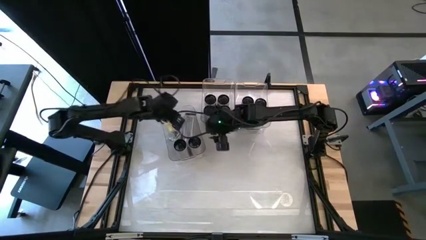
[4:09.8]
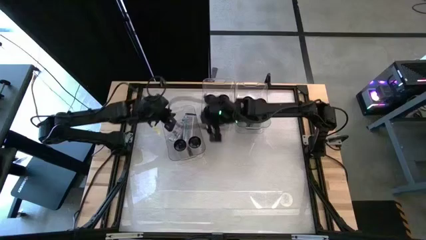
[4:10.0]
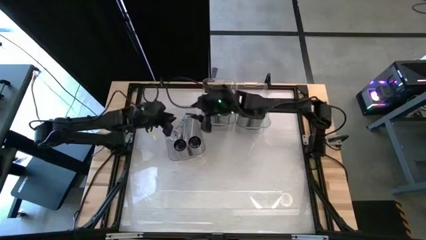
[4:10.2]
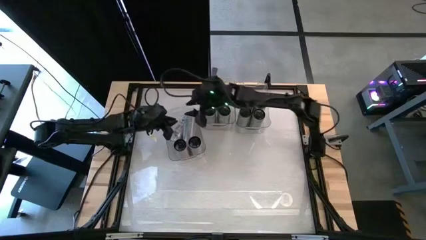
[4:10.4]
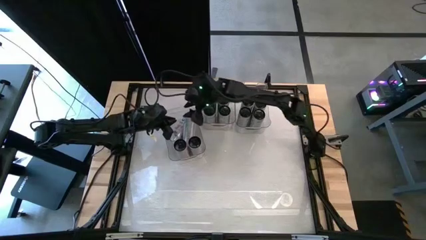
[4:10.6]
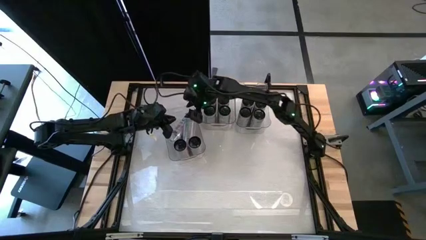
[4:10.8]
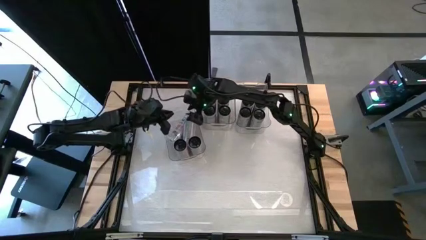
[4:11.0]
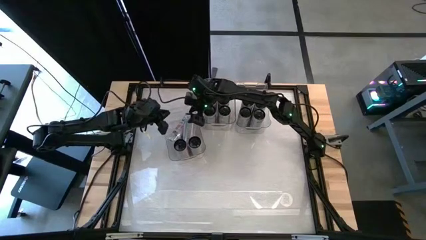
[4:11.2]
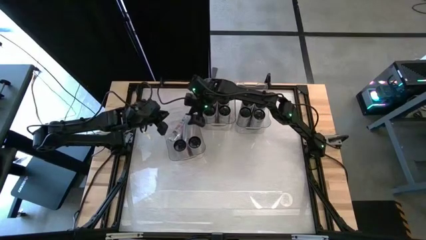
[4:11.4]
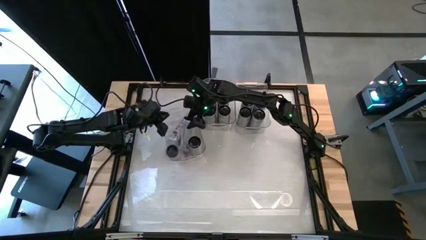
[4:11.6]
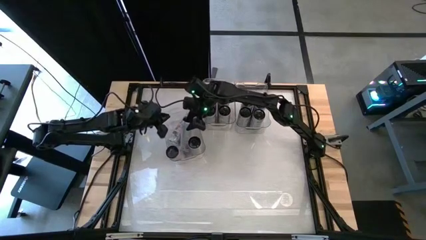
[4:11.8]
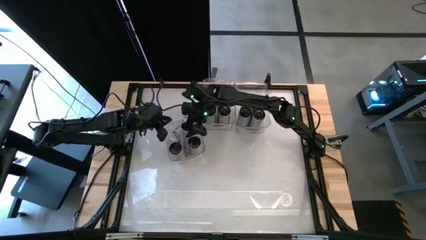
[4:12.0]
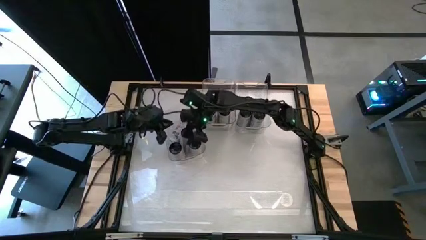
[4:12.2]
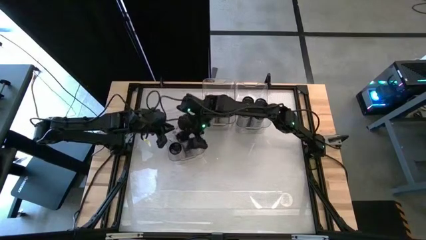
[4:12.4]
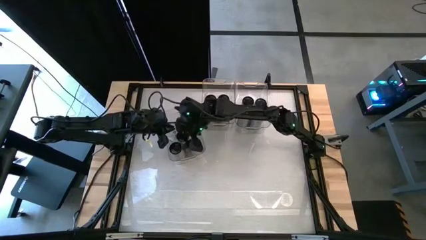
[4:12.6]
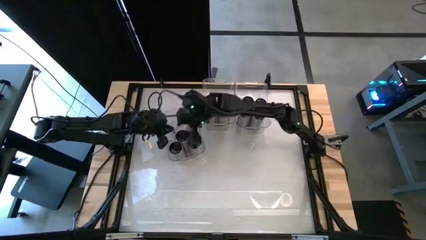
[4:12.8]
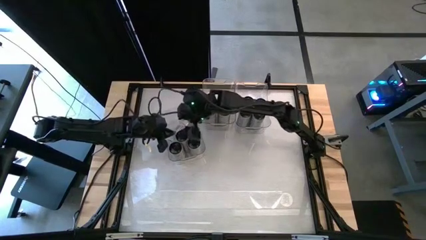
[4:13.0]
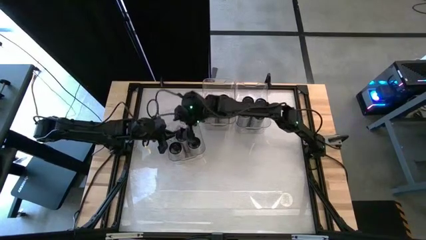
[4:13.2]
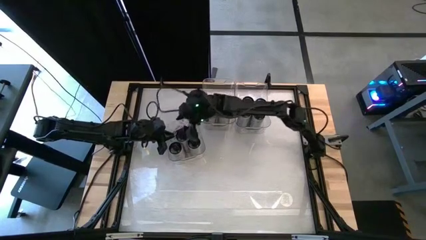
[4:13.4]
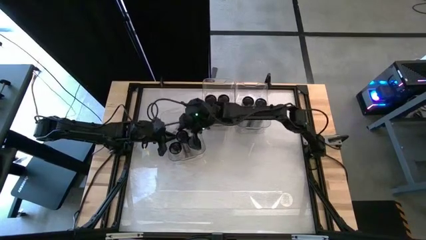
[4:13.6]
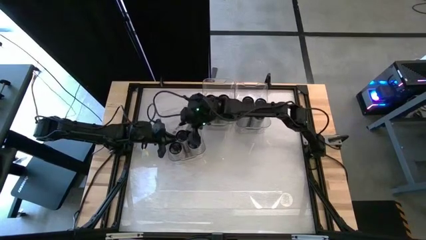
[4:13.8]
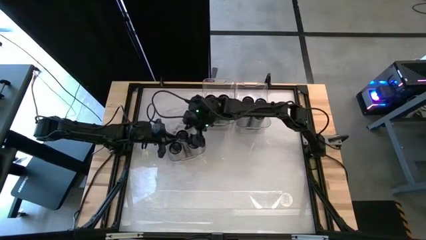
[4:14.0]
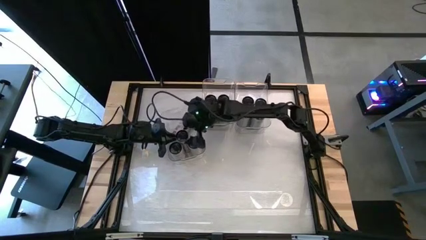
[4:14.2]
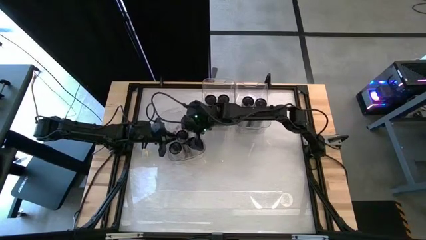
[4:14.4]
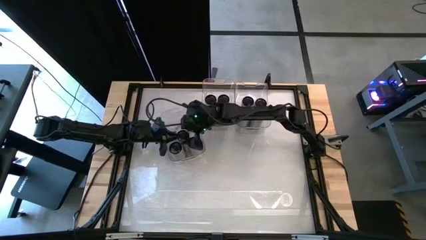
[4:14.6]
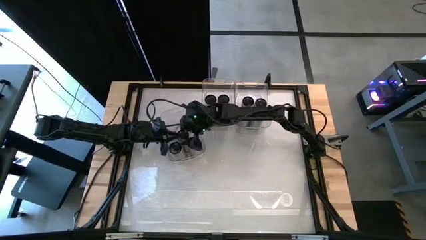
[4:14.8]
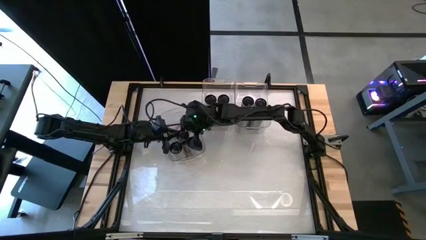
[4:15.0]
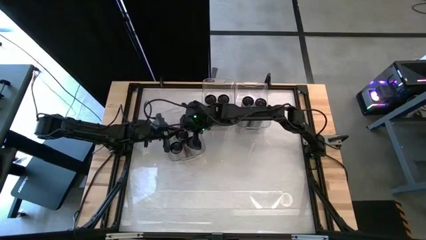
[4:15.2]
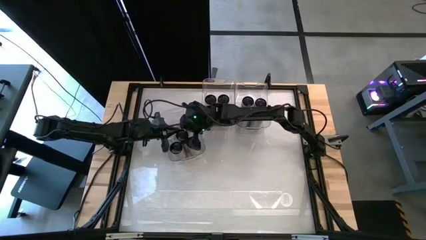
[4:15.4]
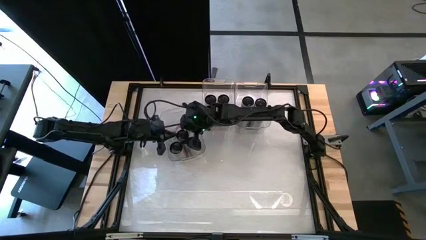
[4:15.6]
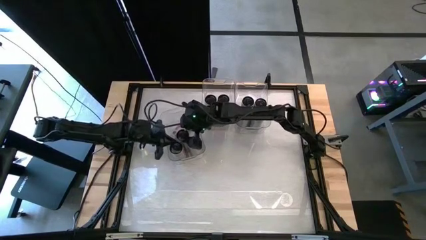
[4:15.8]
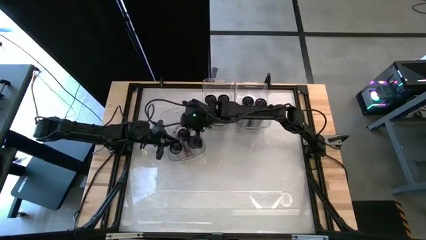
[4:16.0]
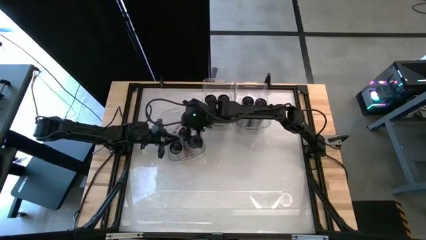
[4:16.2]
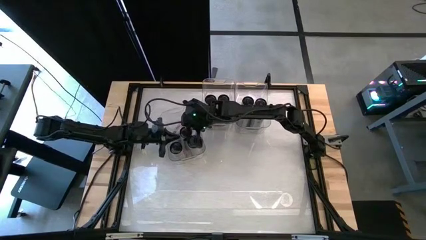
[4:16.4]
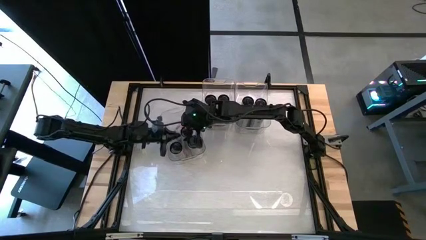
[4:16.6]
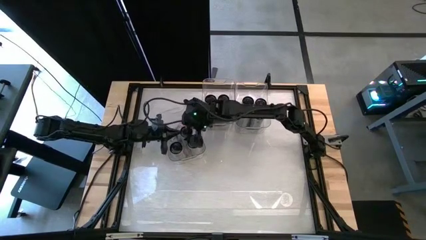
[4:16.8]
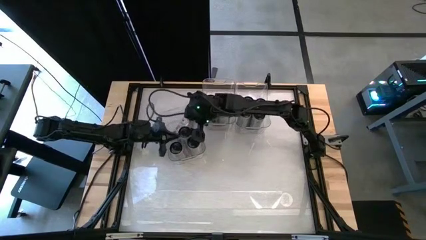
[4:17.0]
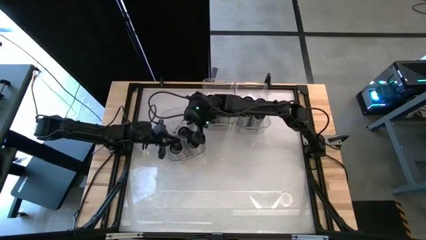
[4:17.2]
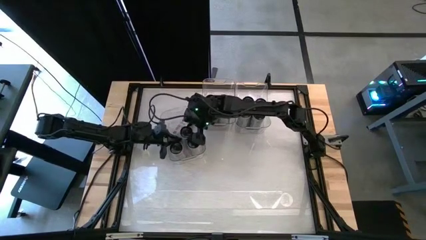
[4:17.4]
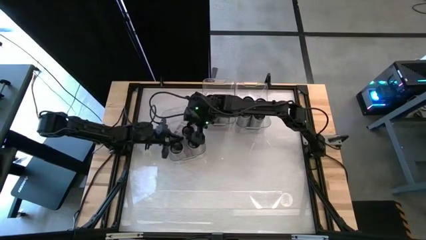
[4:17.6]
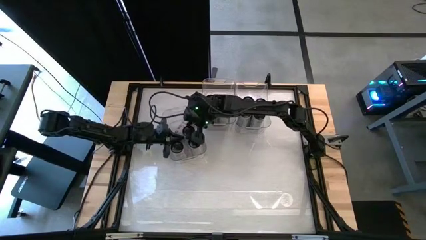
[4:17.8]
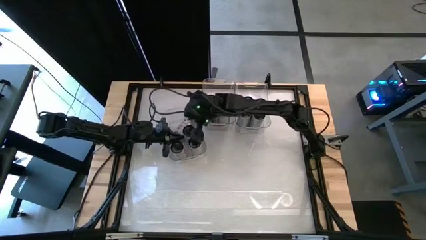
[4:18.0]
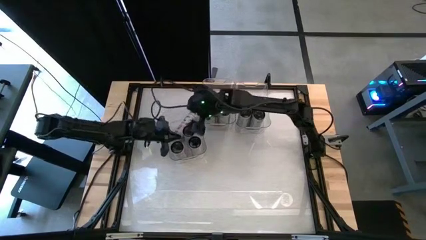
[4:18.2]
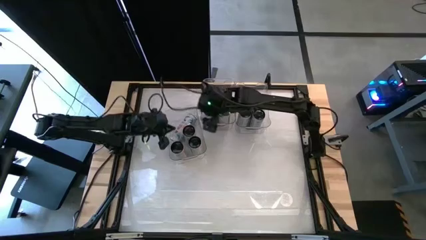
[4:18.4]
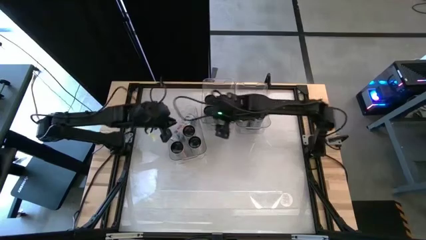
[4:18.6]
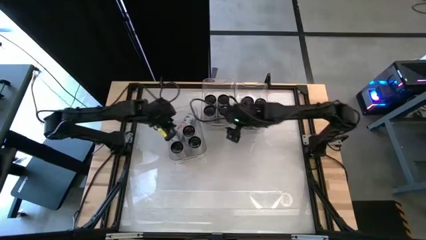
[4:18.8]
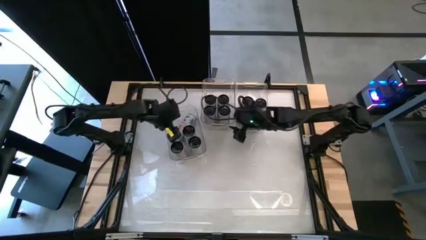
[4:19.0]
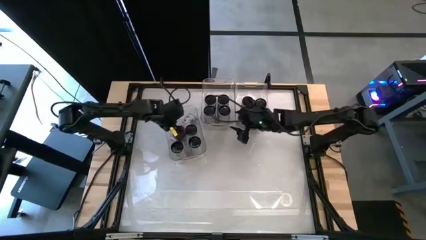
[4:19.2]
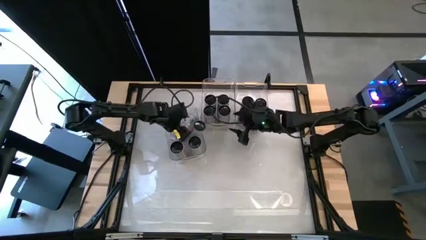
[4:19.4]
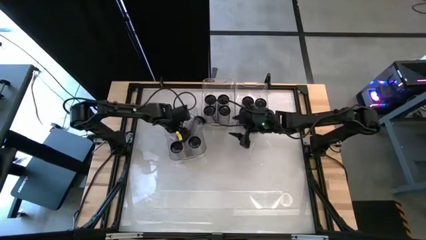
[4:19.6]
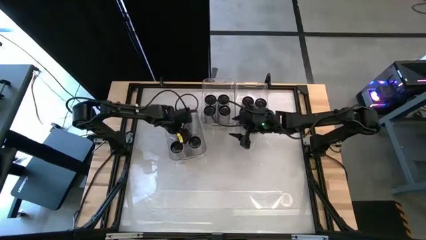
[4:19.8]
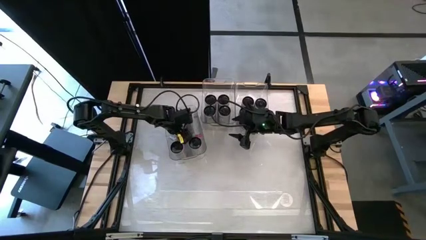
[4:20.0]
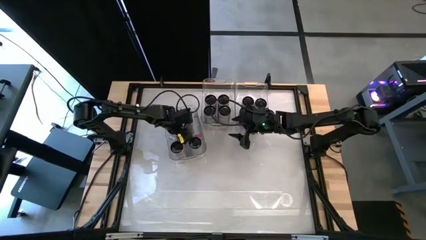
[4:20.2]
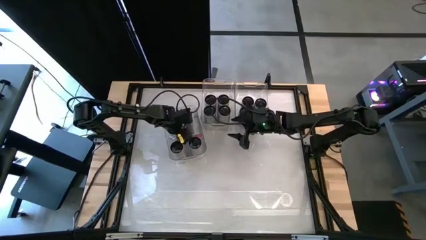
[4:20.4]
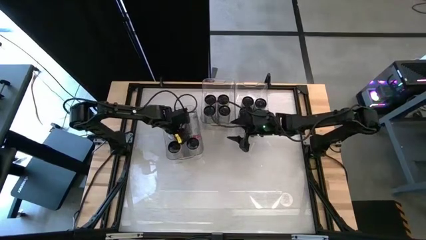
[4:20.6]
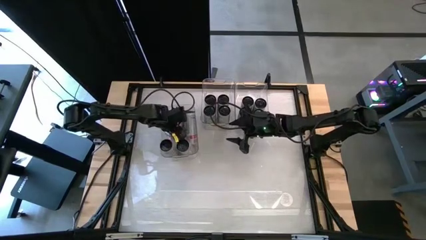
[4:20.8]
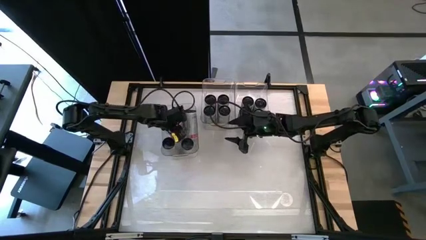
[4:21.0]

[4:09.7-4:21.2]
Task: Sort soda cans
Adjust the white pink soda cans
